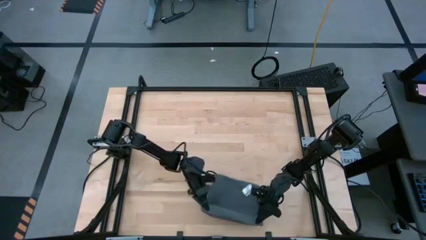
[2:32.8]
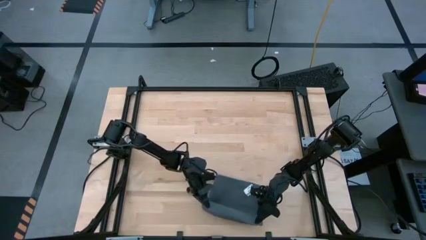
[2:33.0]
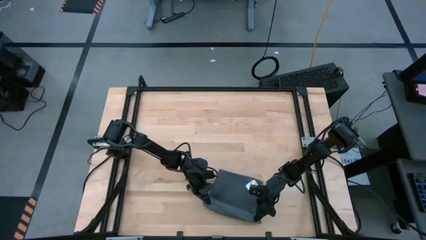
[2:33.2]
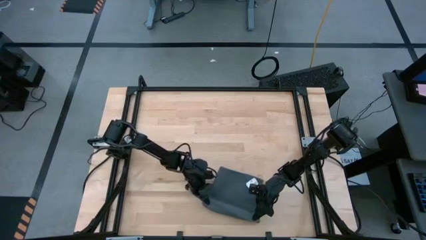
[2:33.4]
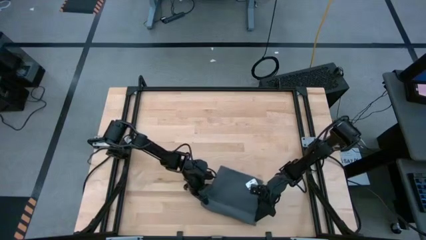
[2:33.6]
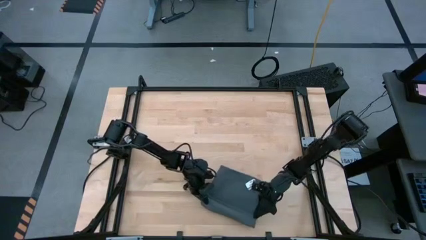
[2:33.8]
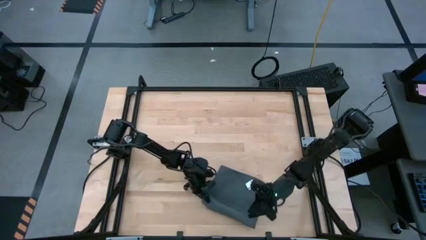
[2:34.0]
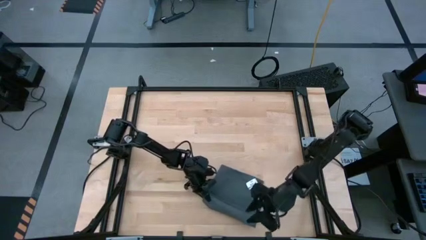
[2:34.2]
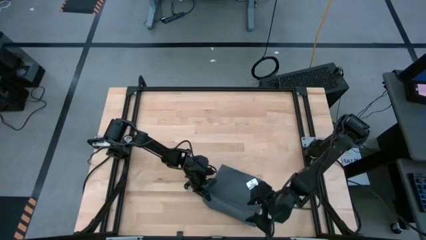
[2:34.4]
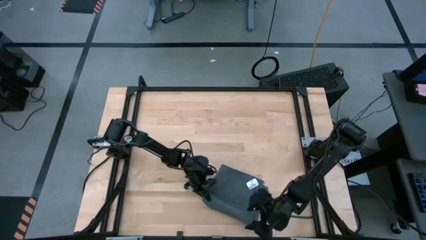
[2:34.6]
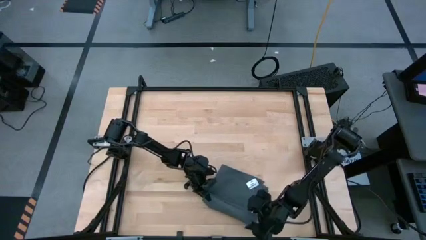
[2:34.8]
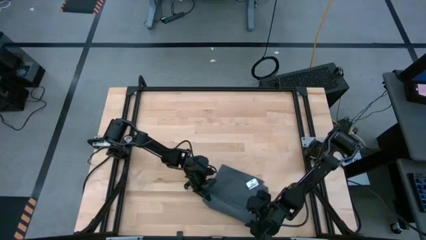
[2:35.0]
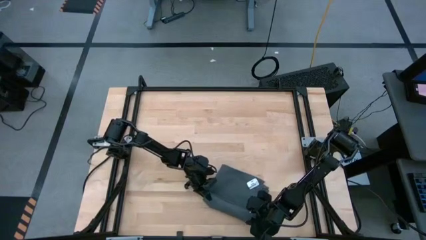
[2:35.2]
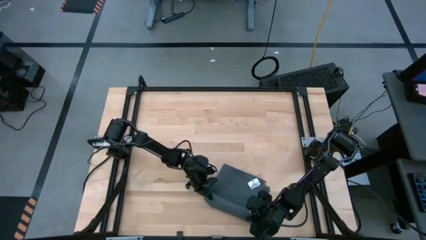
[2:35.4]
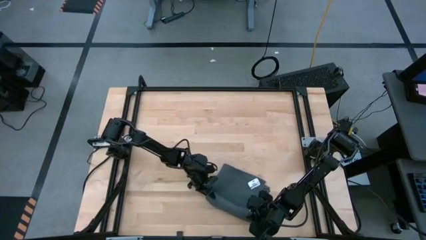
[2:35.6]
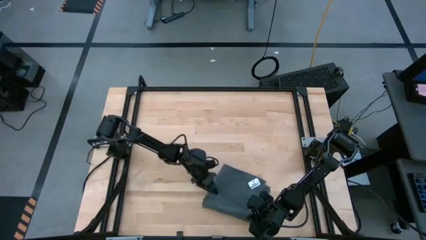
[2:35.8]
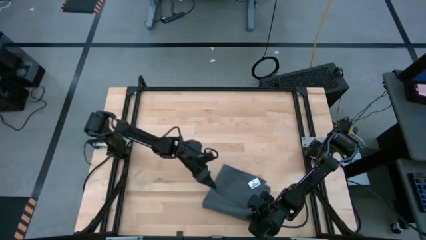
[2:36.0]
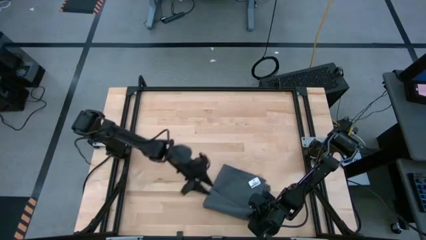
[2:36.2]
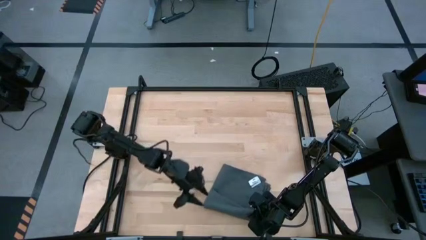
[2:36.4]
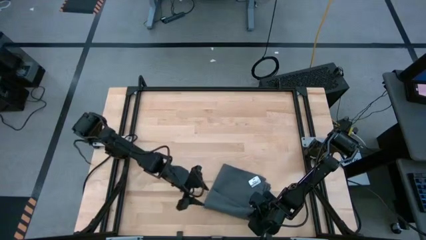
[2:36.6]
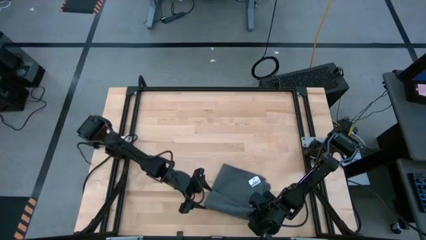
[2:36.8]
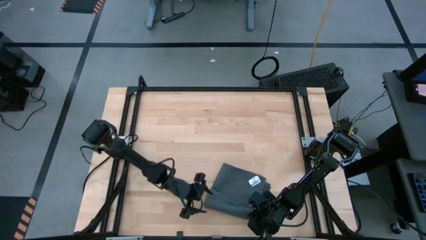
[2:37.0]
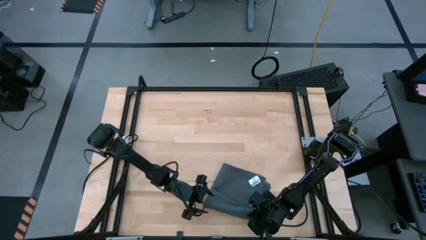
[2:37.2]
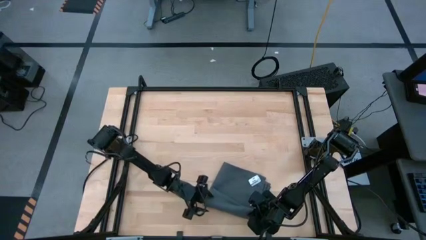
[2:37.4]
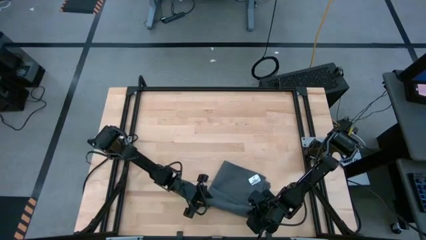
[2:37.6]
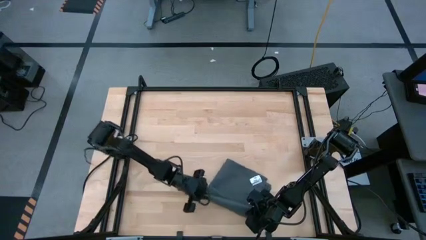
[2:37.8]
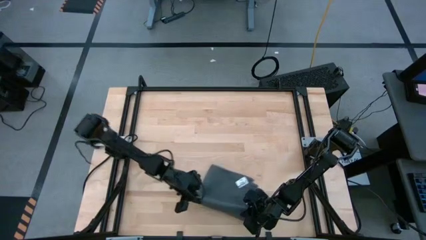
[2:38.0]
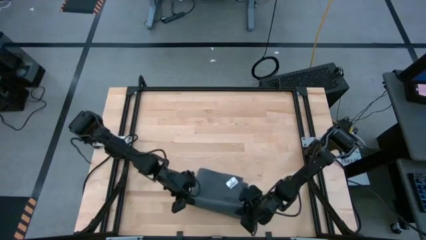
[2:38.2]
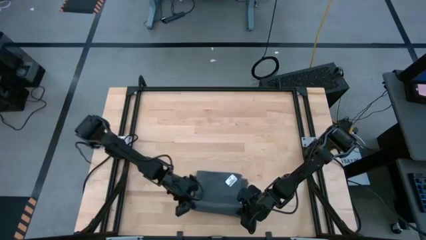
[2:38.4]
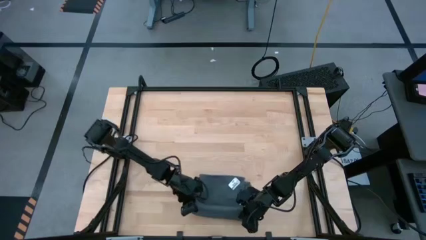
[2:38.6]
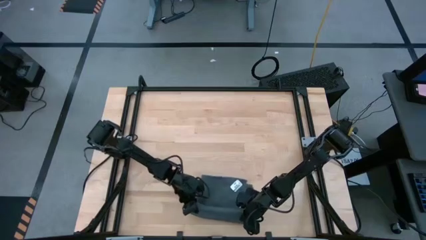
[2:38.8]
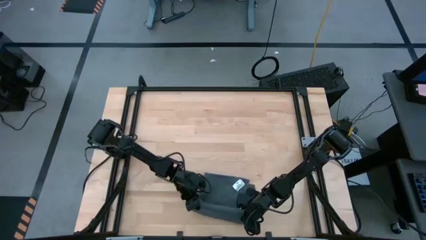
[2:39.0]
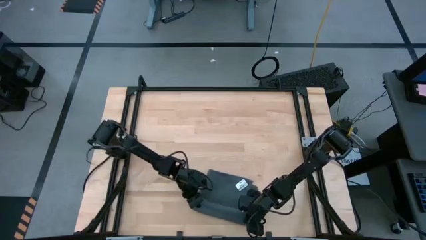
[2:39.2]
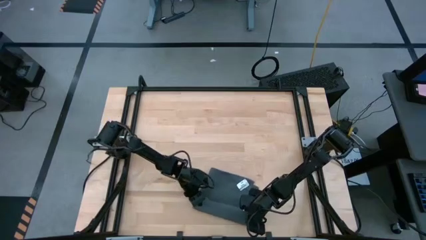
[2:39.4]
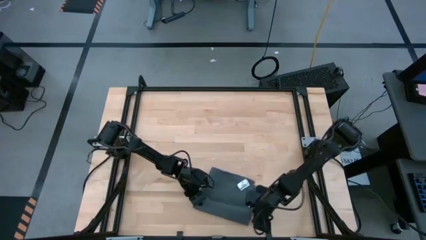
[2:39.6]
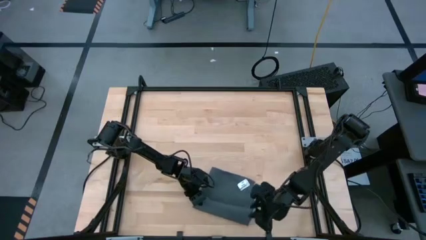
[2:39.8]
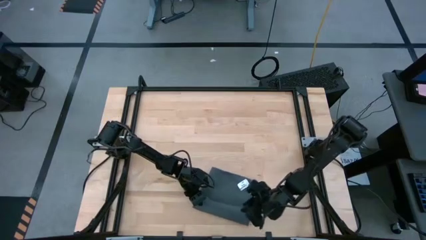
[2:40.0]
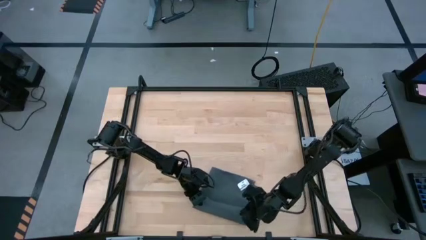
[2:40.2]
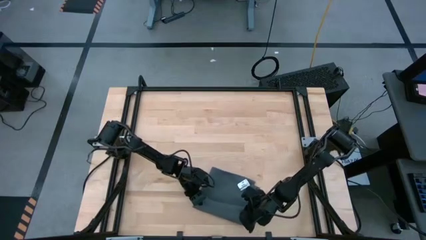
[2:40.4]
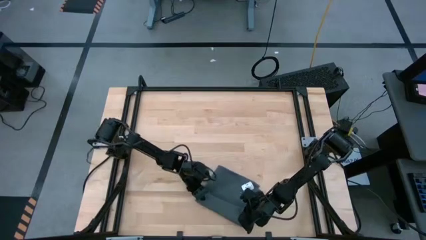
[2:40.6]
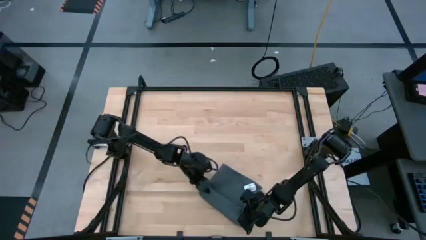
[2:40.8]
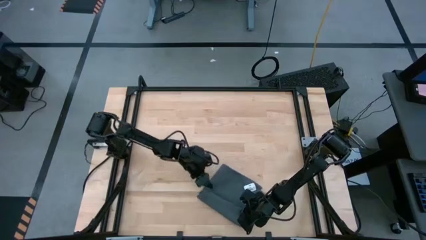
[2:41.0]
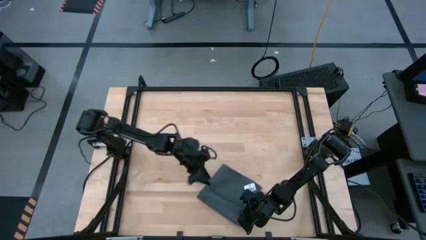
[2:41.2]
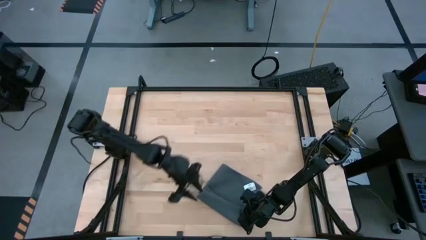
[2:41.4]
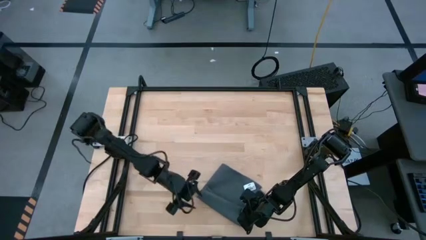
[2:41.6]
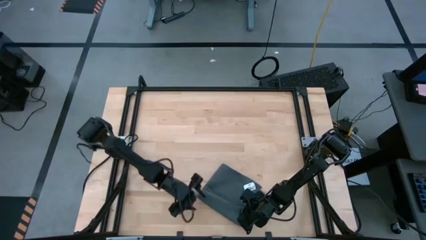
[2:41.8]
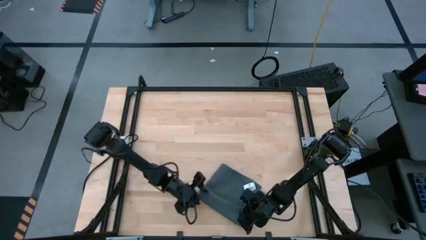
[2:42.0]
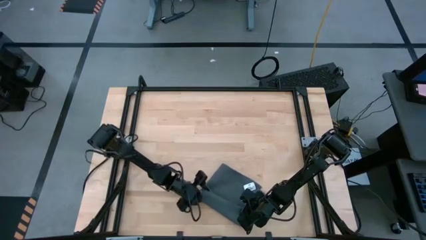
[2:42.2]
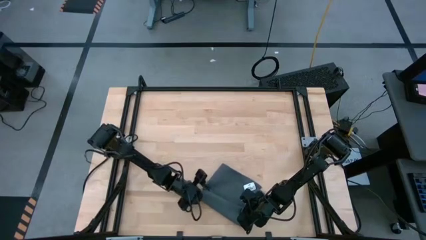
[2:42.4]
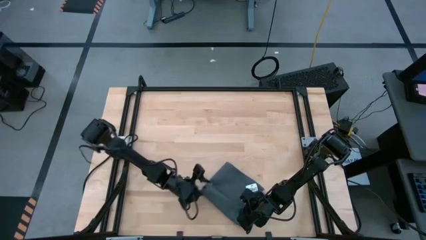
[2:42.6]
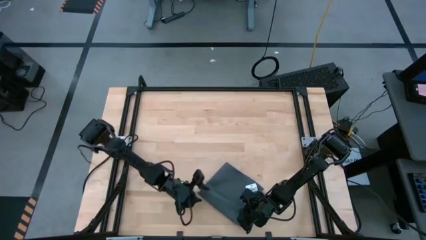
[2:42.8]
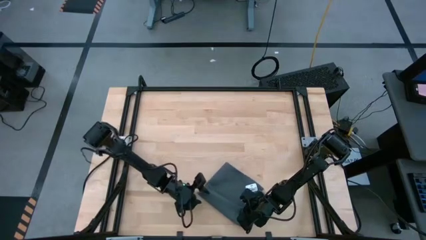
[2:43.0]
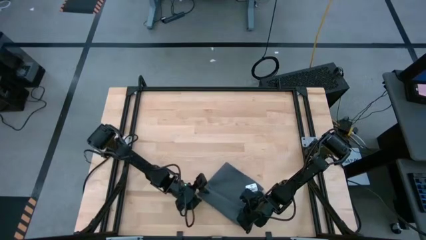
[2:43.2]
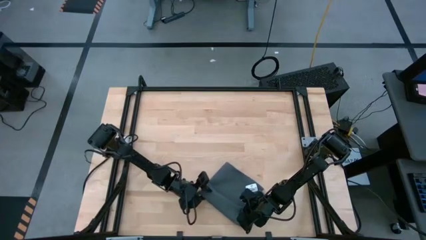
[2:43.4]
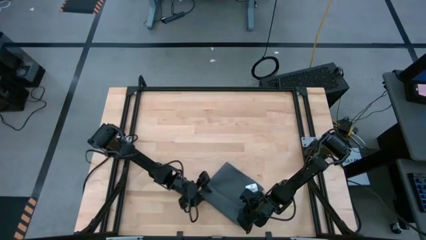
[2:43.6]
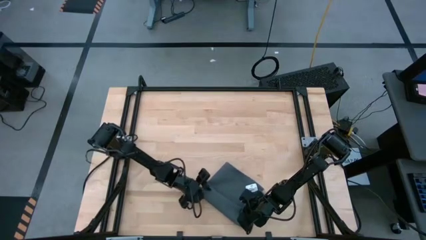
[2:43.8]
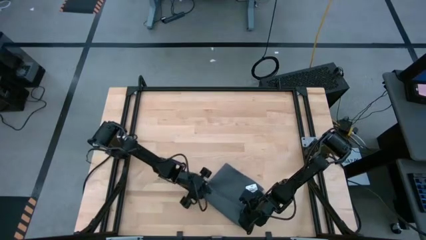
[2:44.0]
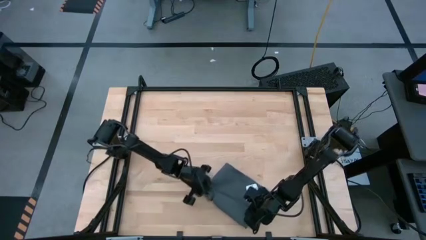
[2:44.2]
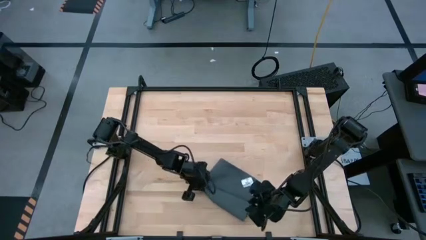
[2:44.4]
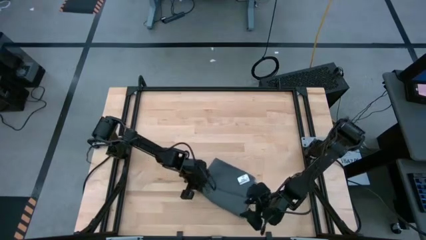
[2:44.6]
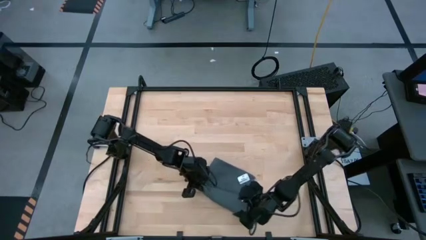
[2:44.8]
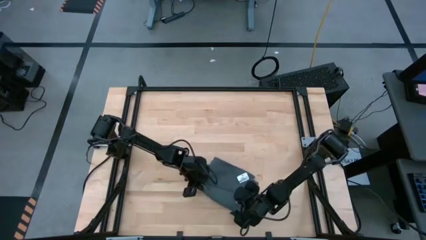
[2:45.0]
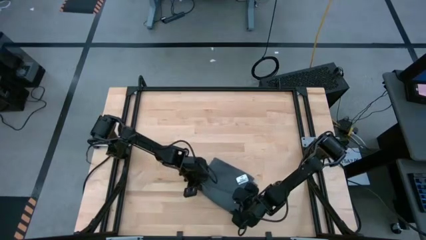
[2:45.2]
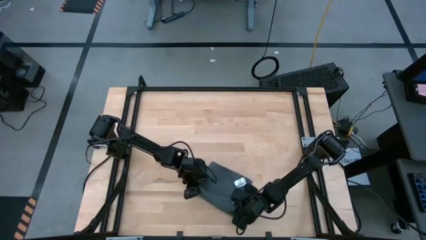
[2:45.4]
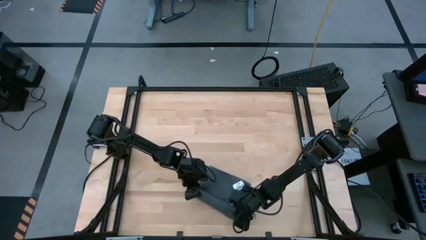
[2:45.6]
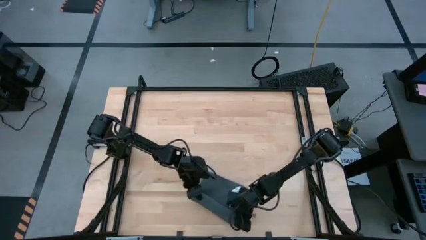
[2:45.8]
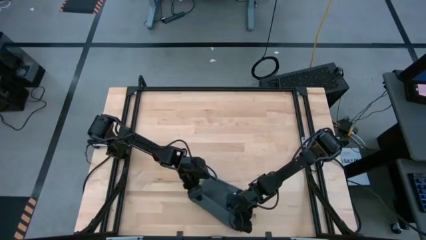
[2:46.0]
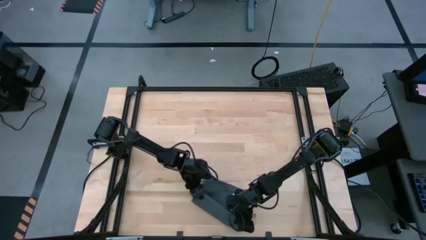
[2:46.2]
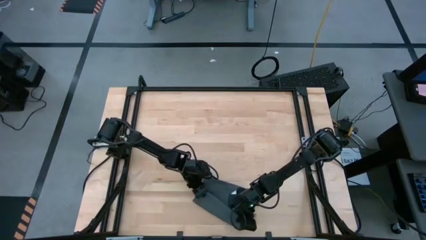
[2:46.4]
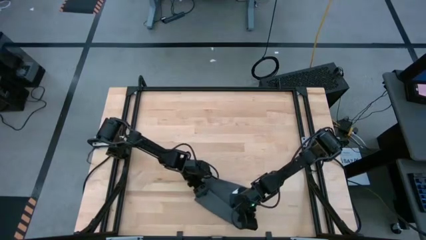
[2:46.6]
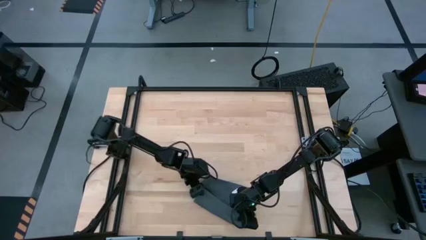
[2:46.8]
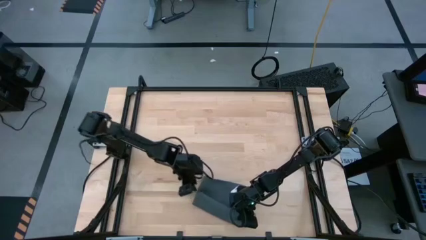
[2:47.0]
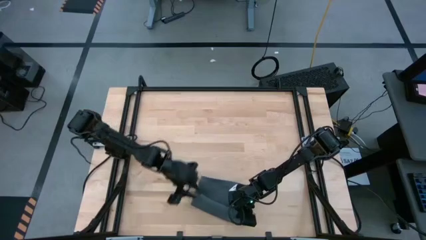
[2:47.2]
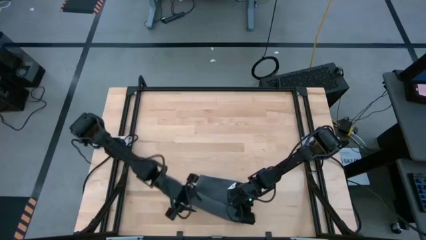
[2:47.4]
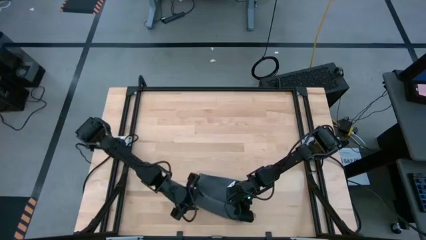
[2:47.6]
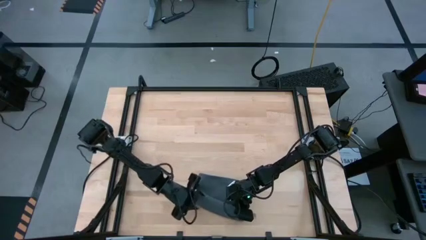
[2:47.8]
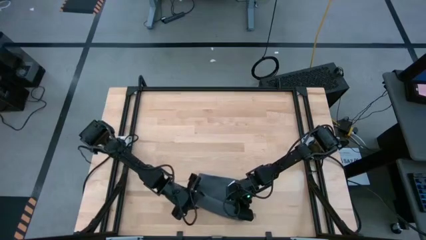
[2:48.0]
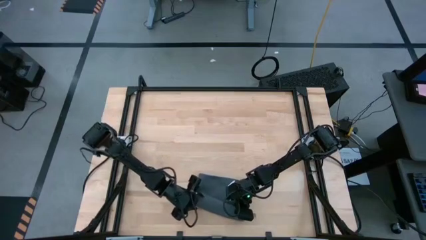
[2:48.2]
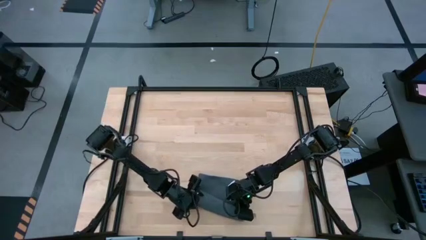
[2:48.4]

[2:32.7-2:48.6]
Task: Roll towel
Roll the gray towel on the center of table
